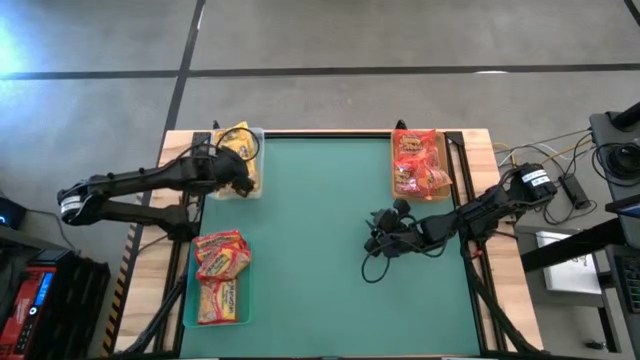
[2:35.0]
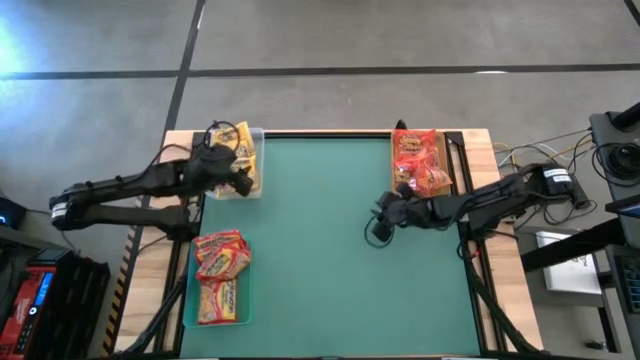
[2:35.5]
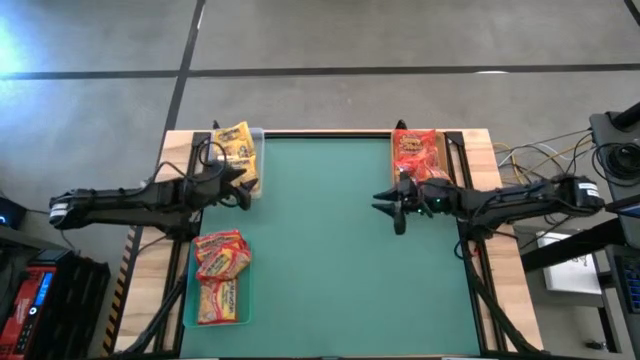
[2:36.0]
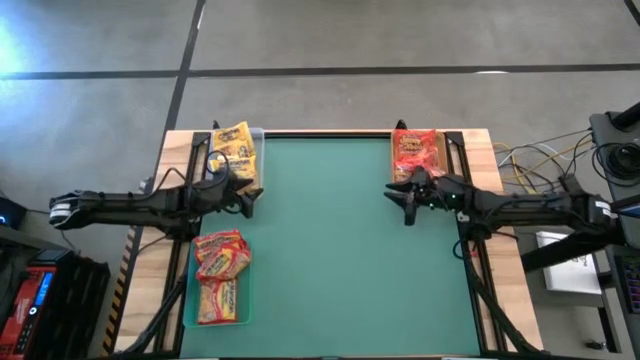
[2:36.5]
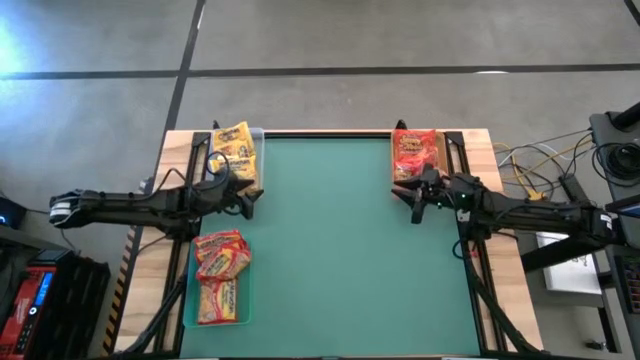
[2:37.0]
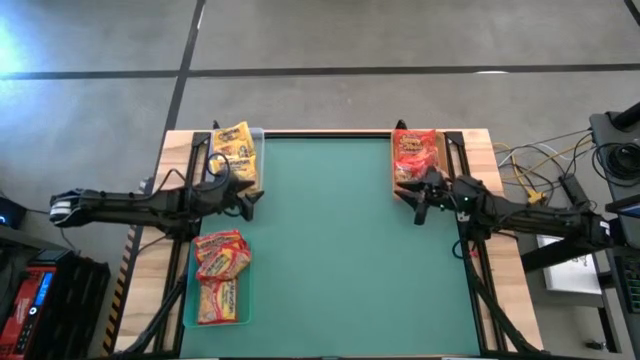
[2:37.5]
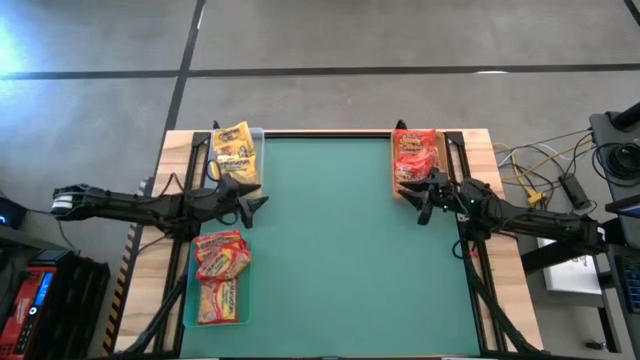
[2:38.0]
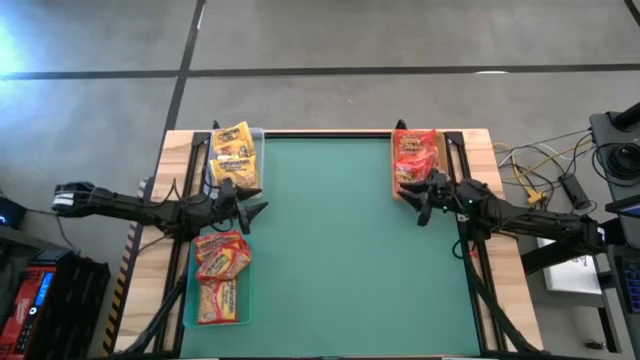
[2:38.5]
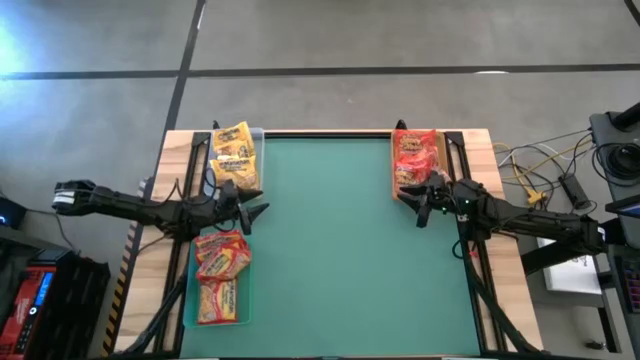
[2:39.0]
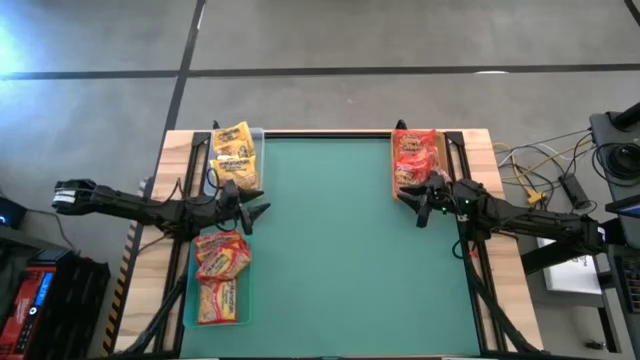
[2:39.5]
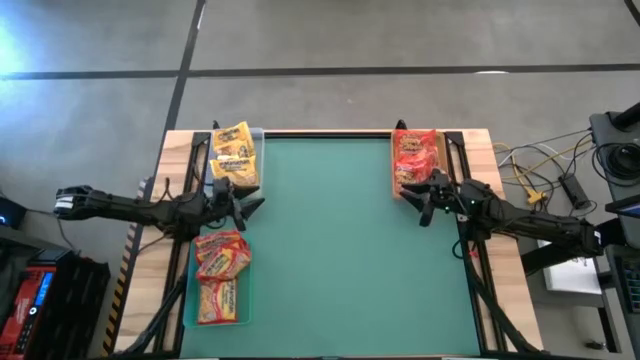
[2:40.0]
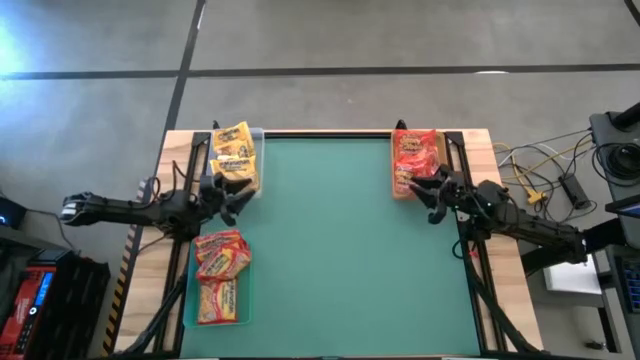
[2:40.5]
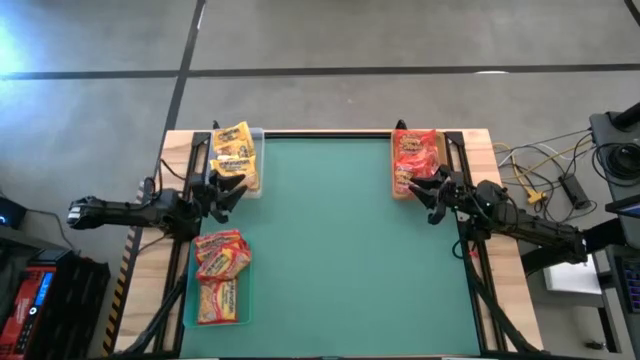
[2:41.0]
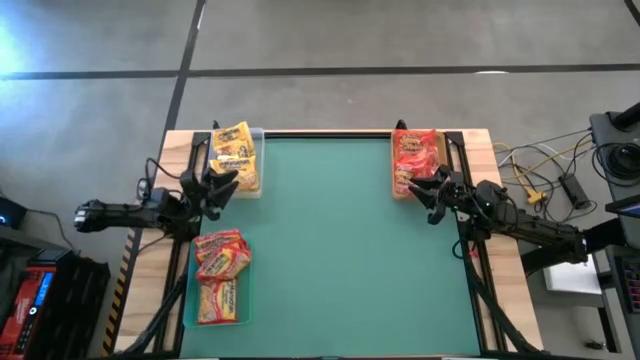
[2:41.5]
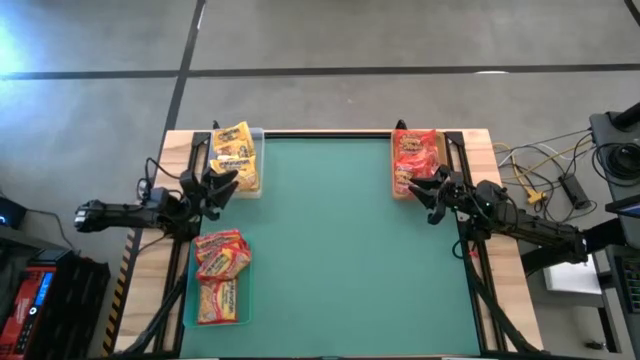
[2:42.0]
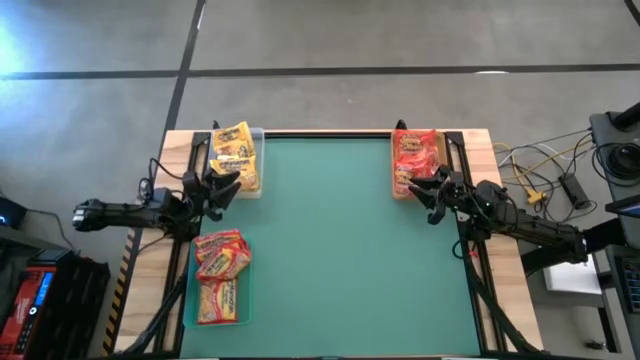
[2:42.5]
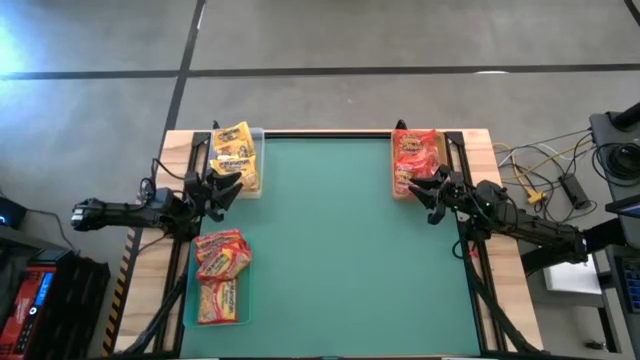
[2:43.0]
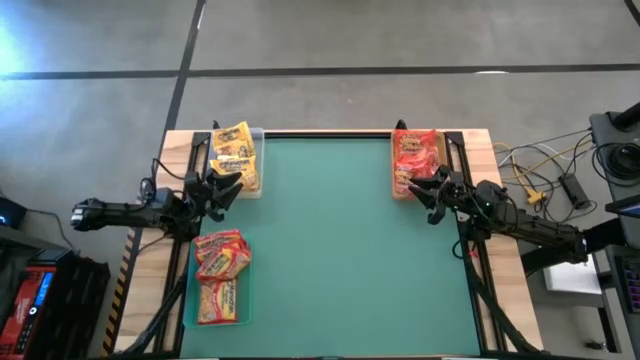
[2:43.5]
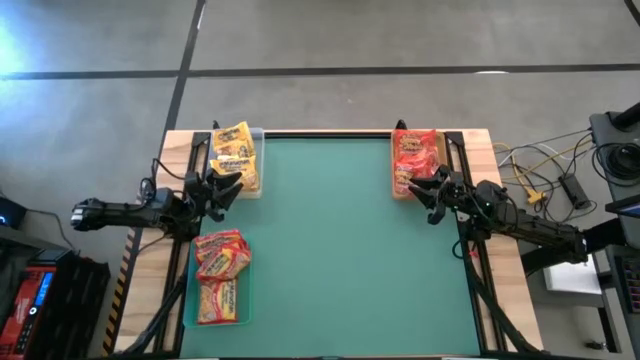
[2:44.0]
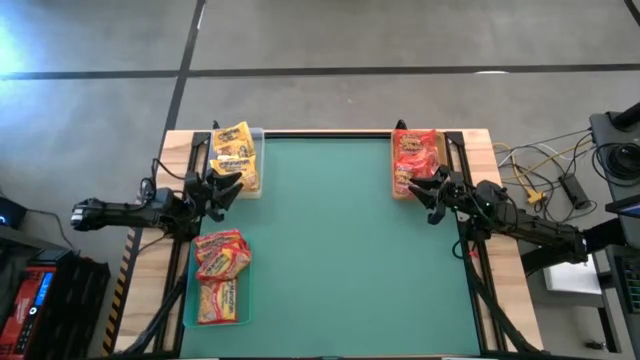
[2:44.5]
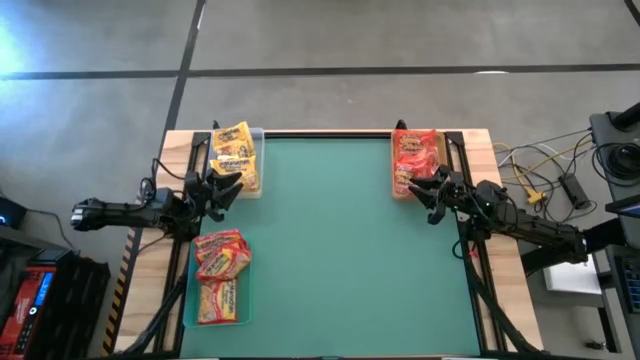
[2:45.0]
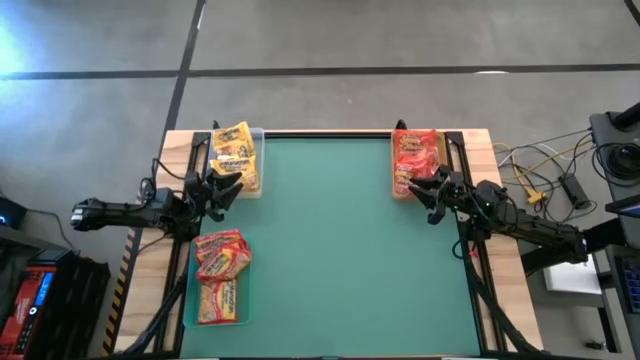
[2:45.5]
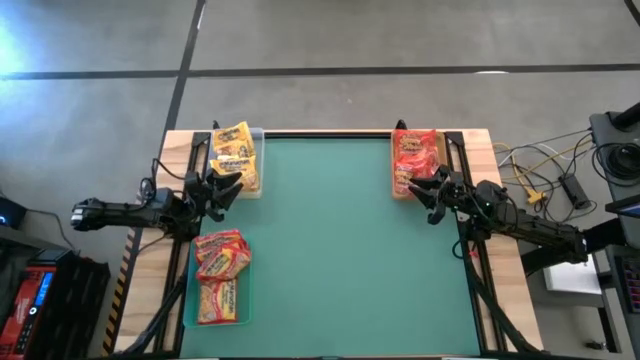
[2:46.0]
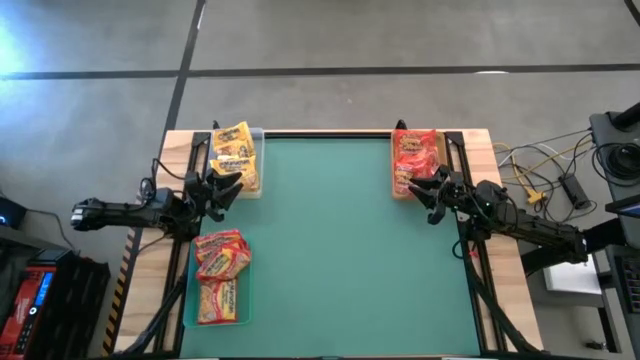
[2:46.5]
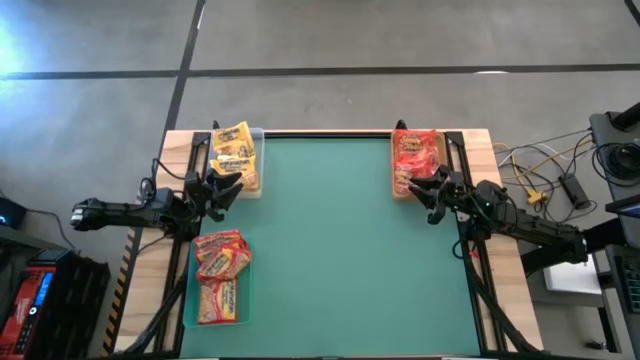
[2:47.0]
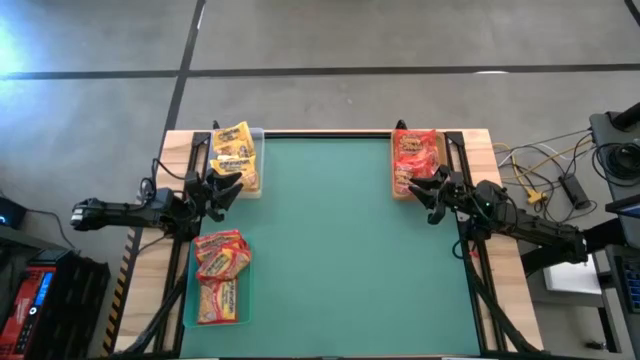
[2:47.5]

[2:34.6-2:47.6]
Task: Sort Maruchan noodles
Return to Home Position

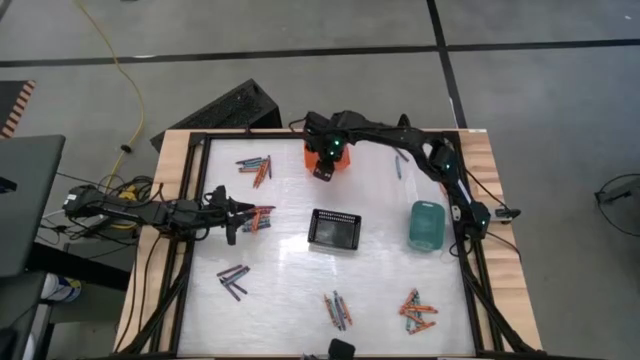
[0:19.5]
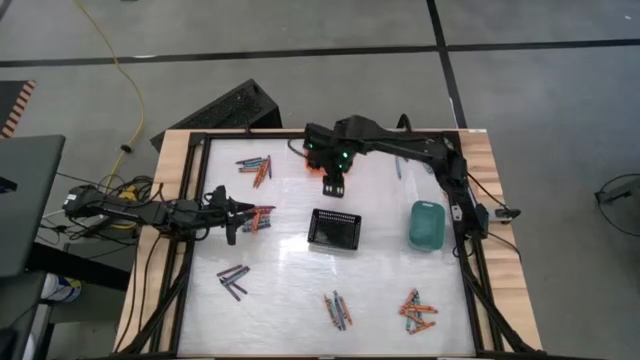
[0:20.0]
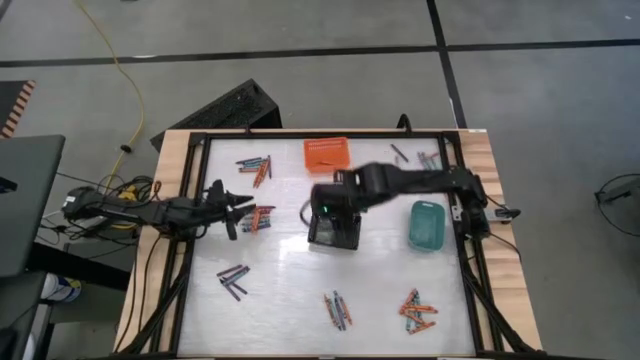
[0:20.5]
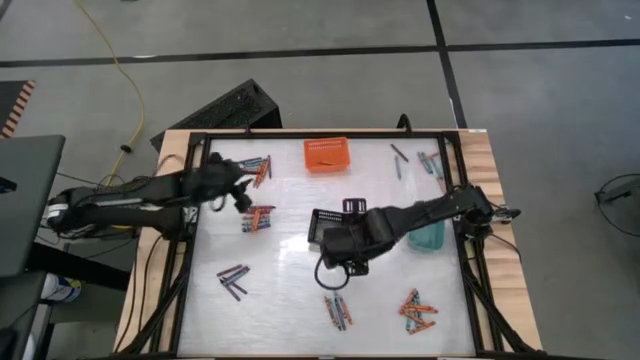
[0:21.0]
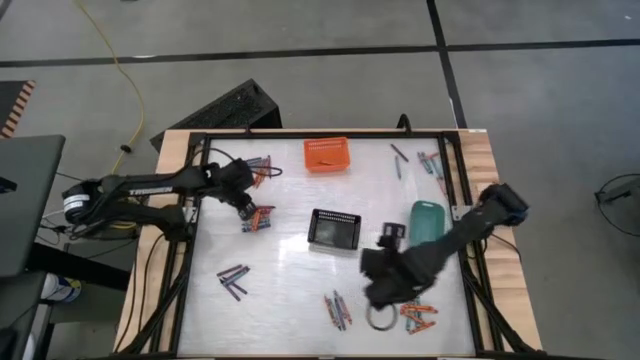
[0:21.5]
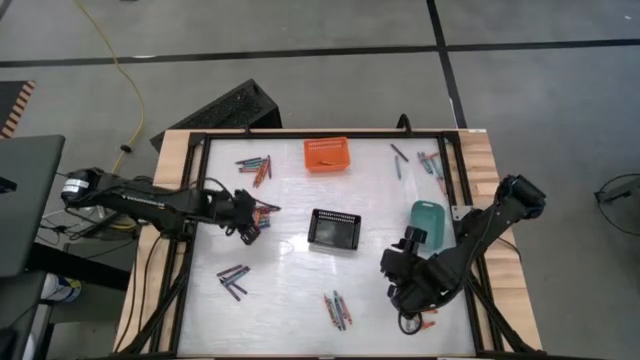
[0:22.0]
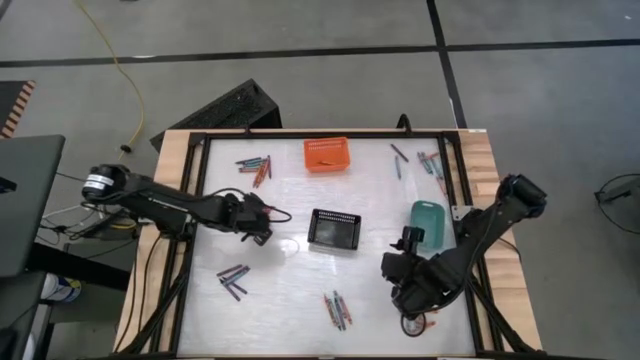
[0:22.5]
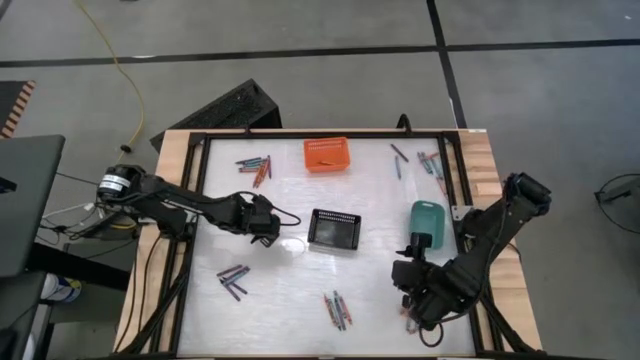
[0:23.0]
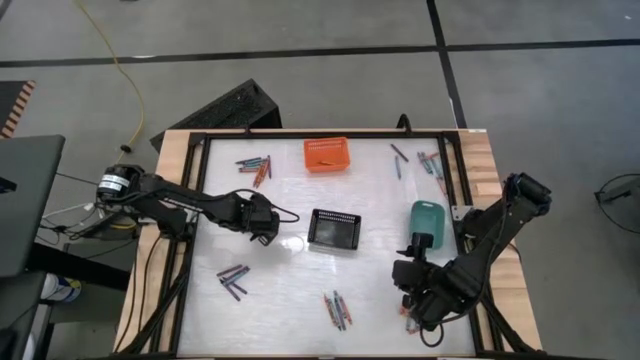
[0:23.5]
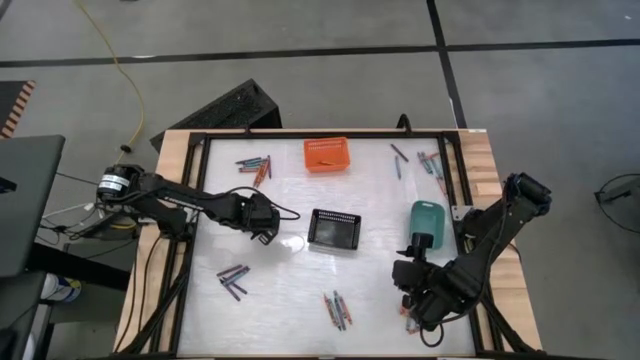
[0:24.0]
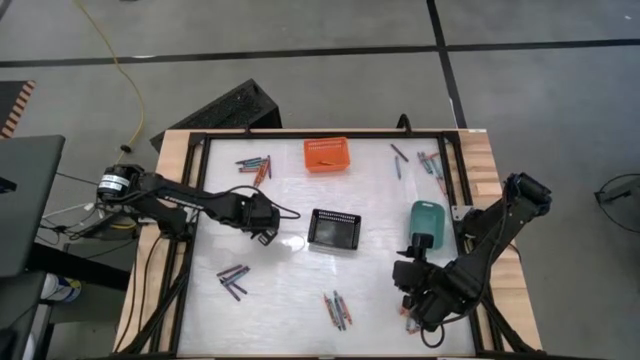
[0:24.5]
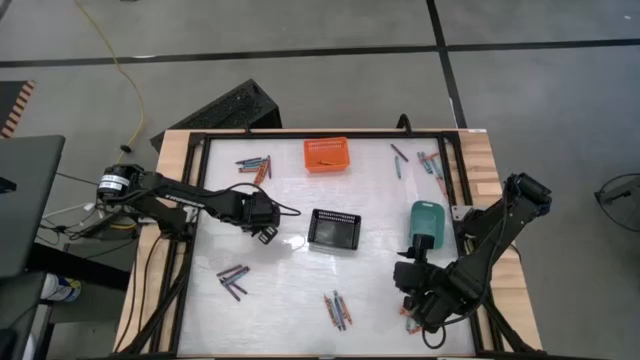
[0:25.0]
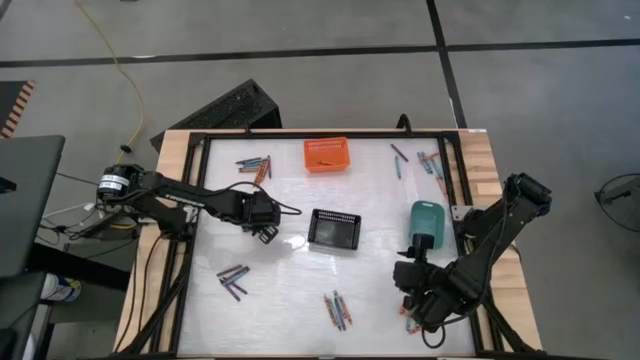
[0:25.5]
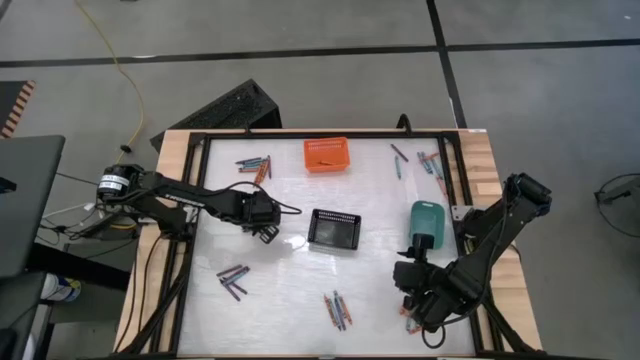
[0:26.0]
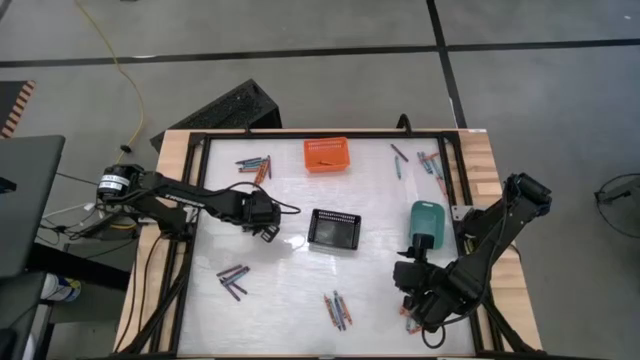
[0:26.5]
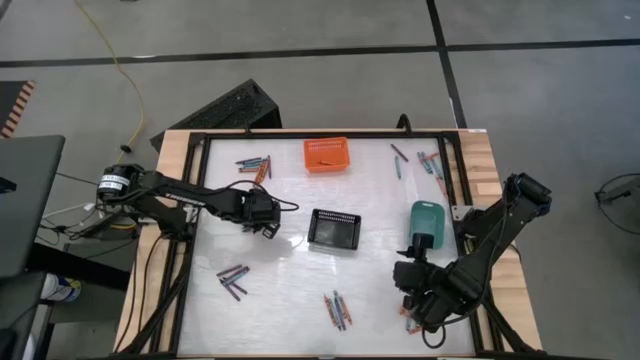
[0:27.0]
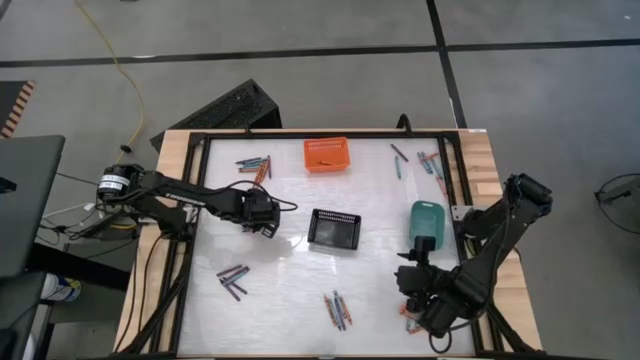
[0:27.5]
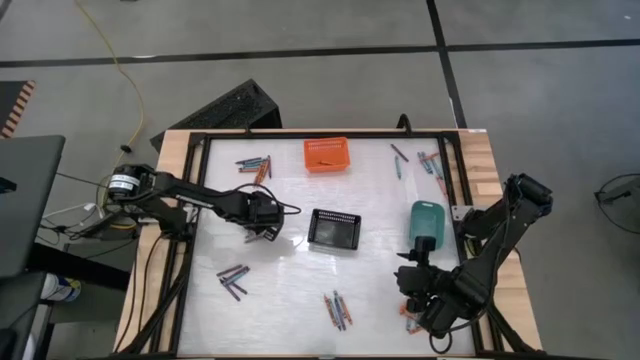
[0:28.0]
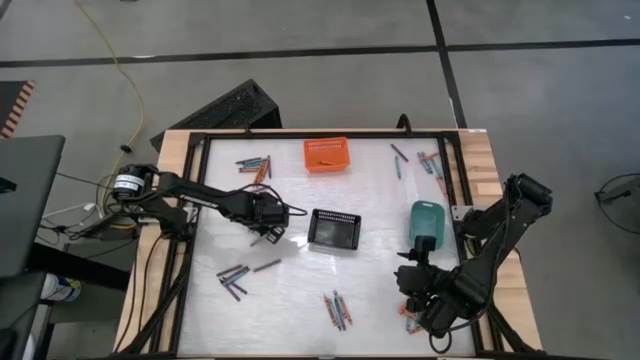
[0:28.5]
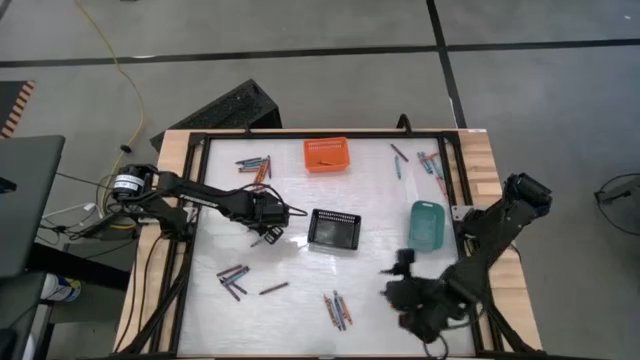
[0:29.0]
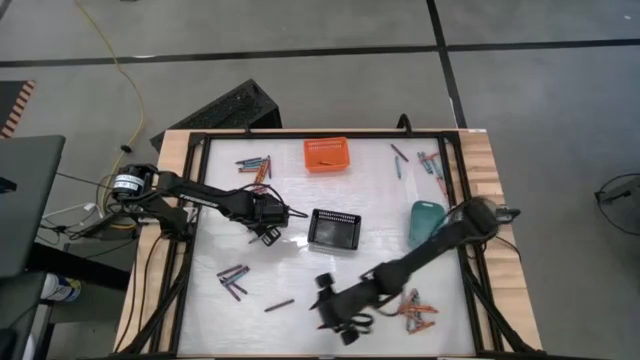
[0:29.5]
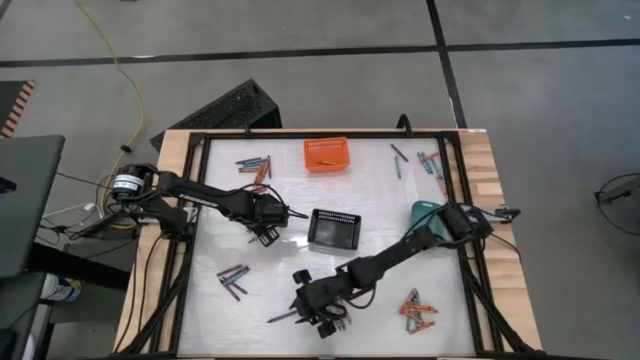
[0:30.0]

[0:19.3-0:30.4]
Task: Sort crayons
Put the orange crayon into the orange bin
